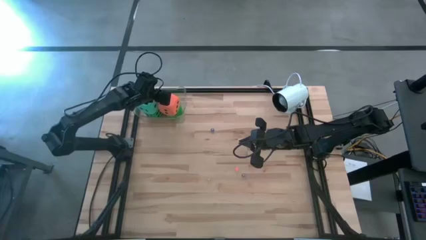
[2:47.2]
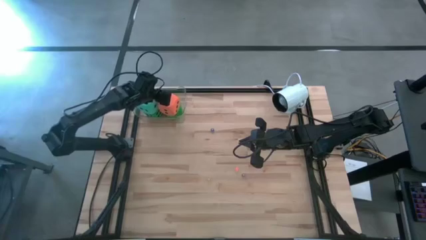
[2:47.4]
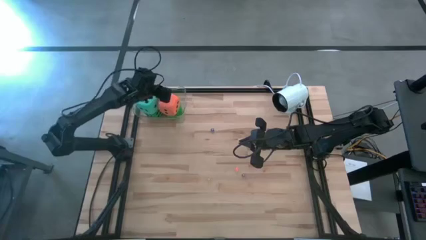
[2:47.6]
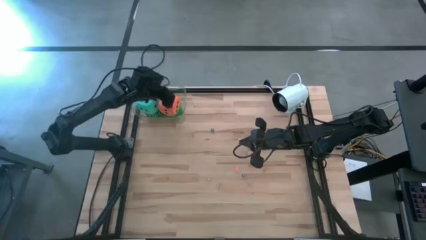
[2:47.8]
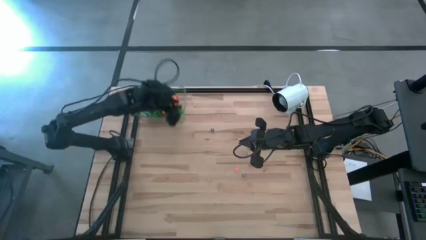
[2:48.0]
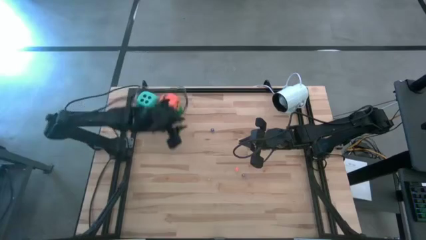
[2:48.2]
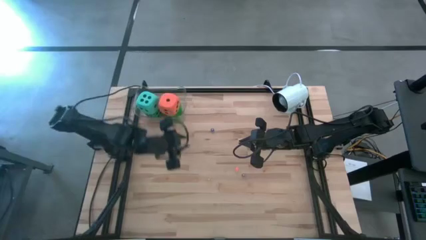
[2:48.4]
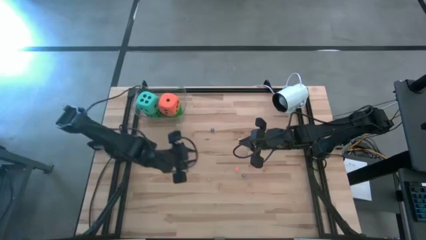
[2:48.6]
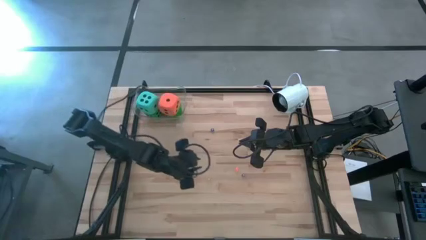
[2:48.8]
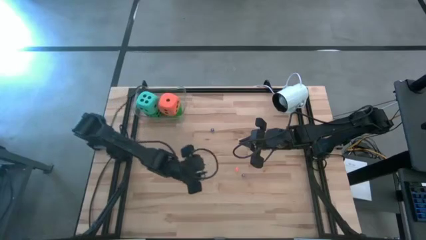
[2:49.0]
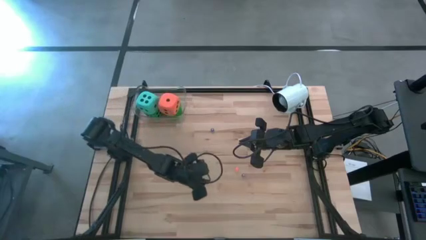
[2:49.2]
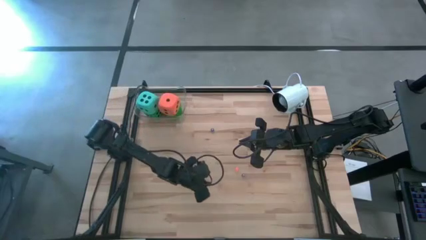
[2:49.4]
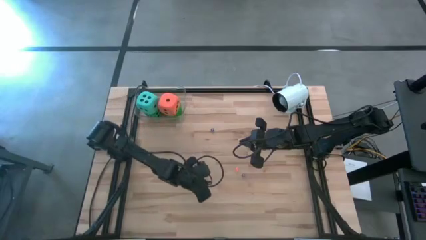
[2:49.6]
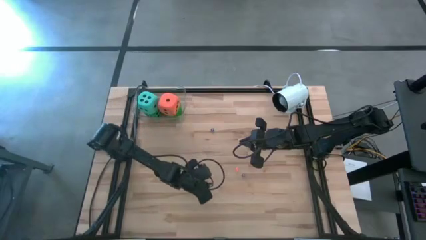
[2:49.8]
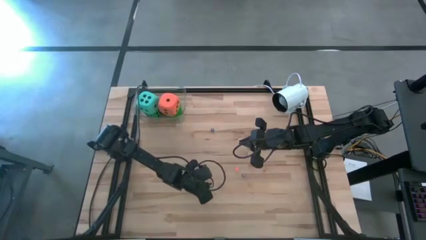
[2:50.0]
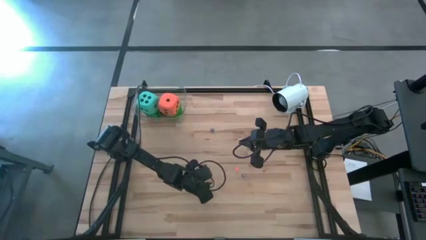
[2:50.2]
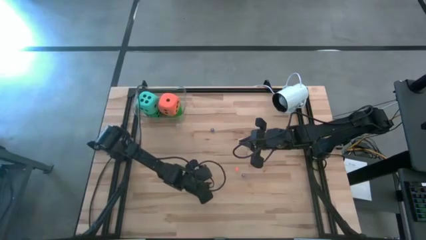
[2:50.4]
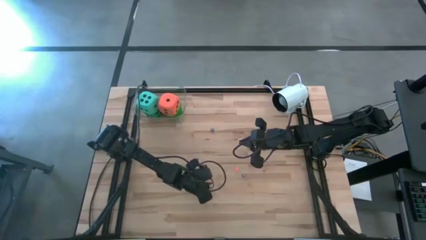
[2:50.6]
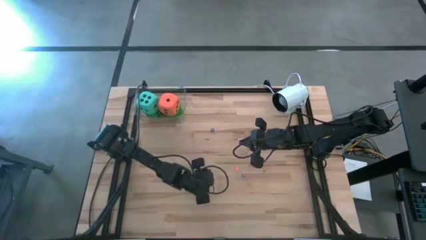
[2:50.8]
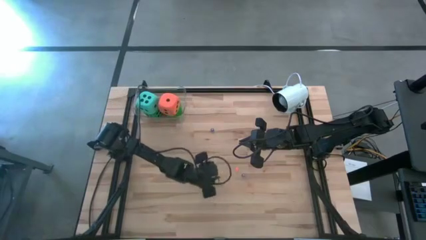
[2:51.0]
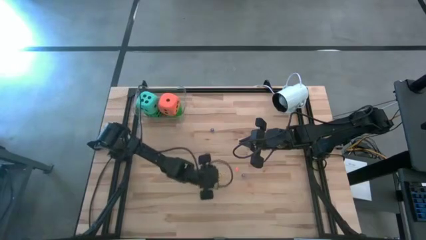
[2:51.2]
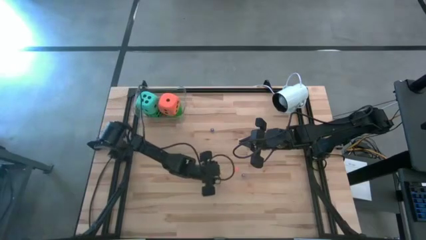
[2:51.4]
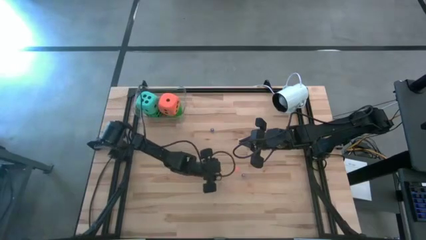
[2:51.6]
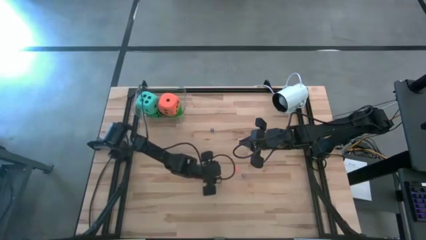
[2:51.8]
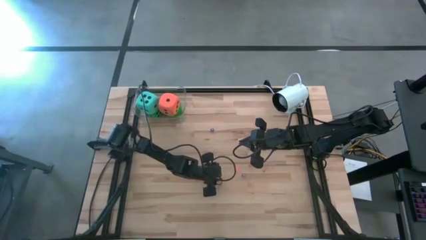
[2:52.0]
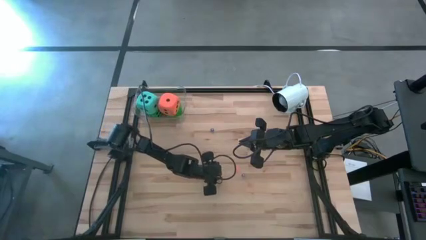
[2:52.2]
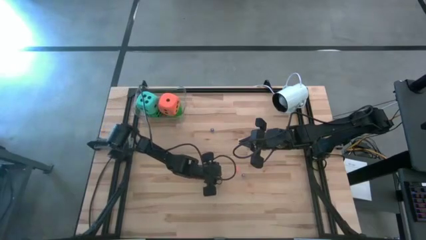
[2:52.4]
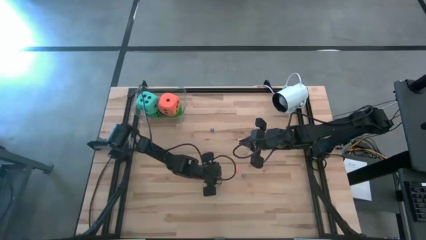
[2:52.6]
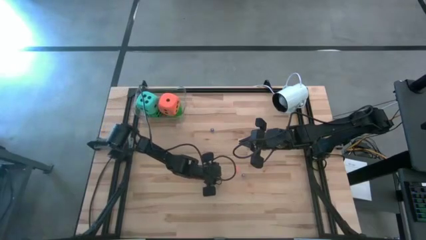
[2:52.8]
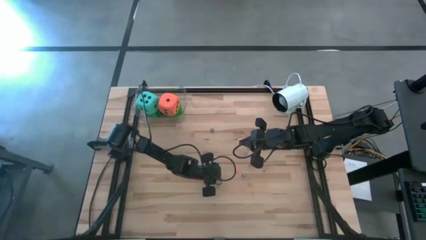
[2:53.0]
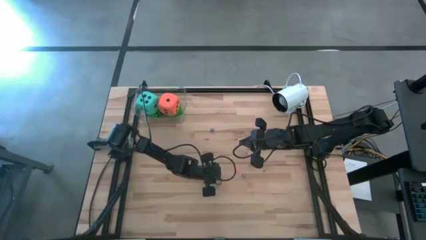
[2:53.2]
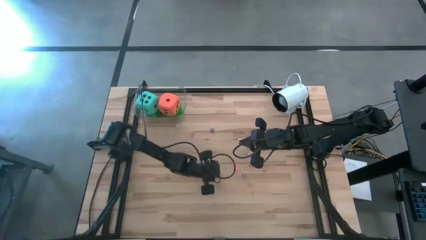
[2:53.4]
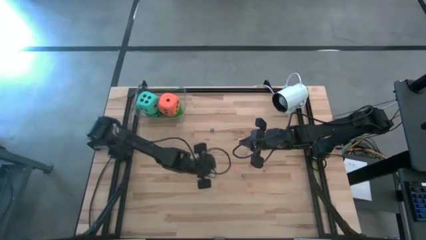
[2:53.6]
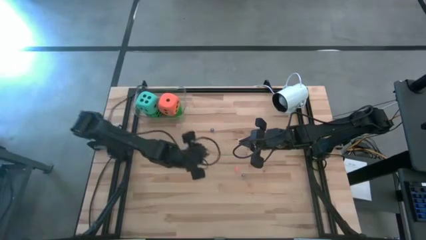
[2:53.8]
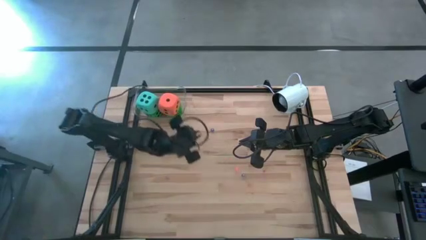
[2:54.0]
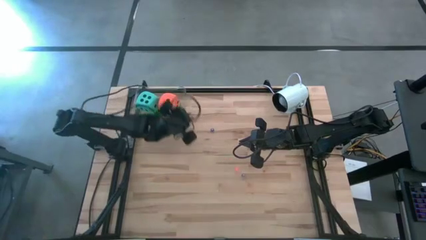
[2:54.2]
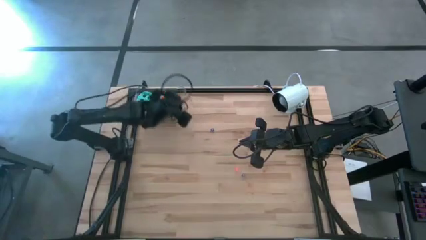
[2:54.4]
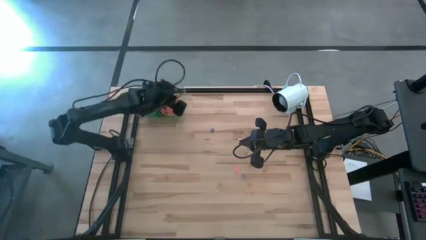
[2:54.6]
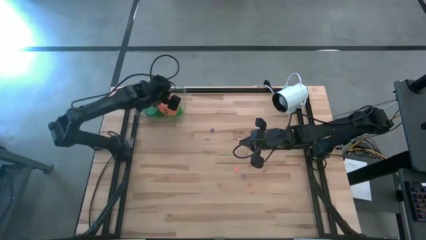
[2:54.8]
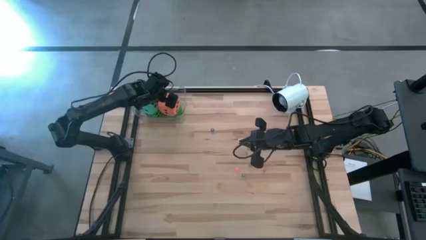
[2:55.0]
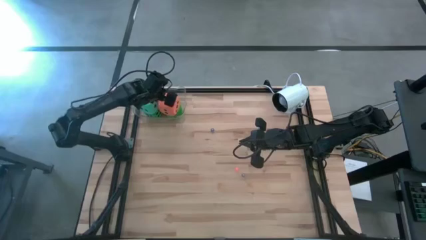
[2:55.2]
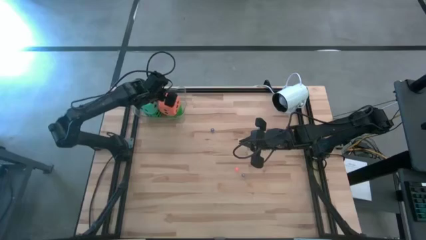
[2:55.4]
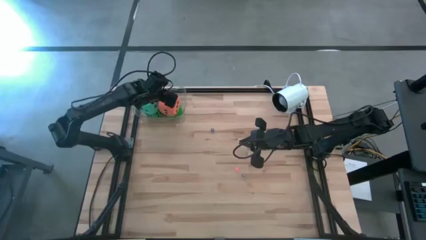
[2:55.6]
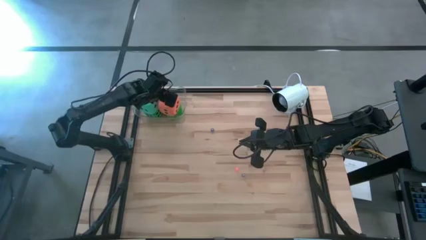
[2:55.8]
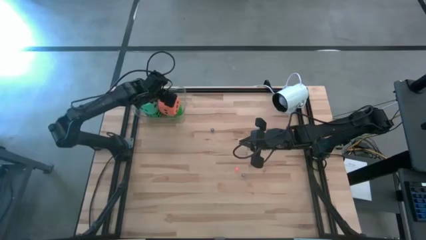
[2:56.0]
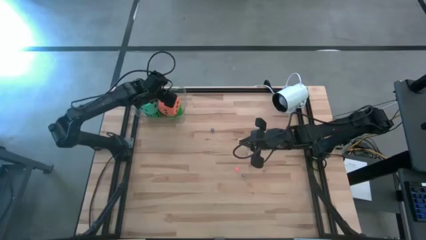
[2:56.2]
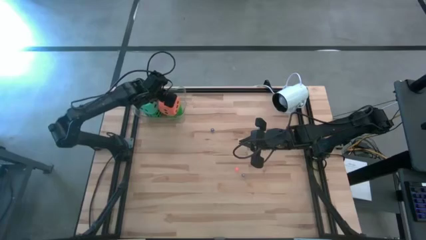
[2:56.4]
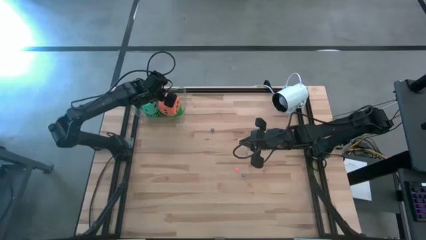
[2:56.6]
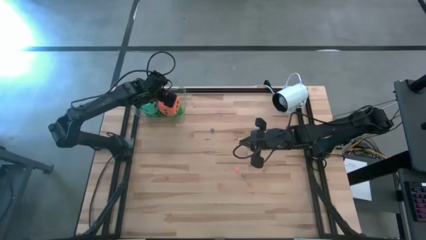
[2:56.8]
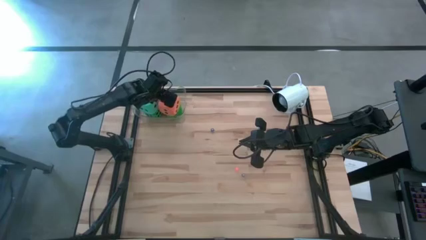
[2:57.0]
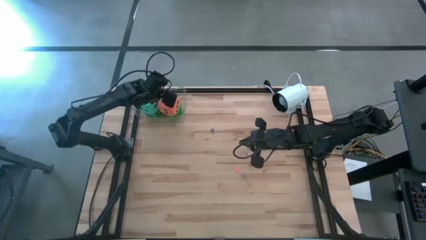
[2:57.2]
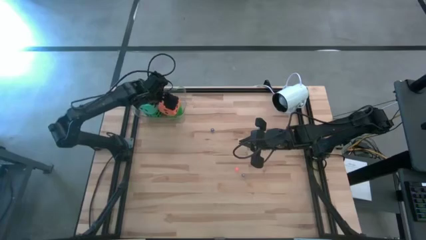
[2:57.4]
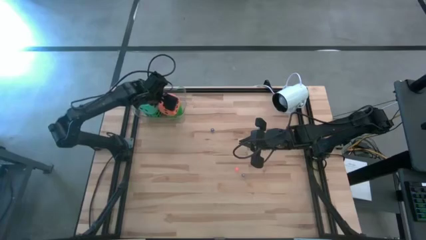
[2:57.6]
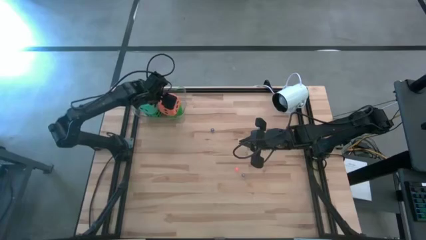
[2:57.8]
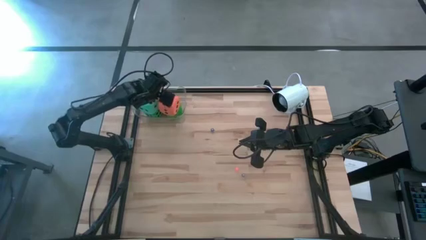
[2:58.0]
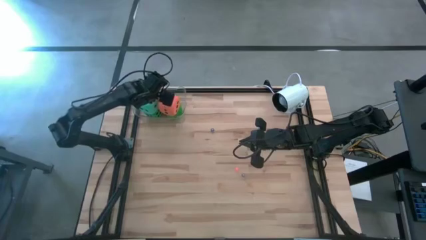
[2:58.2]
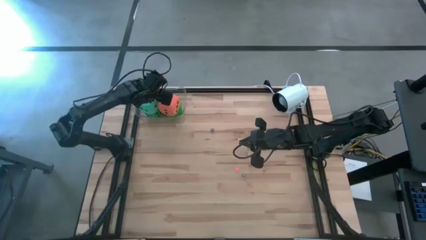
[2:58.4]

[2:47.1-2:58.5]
Task: Pick & Place Dice
Put the small yellow die into the transparent bin

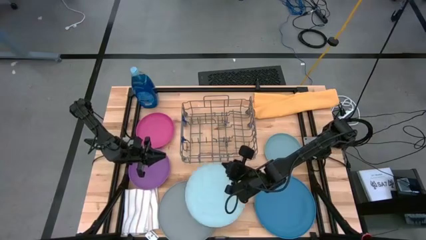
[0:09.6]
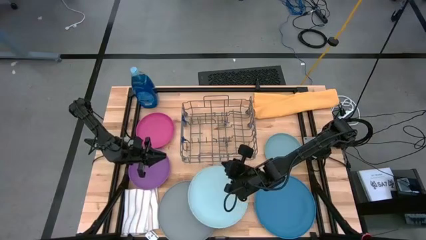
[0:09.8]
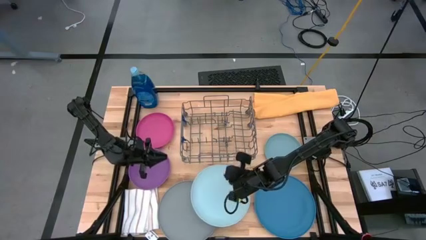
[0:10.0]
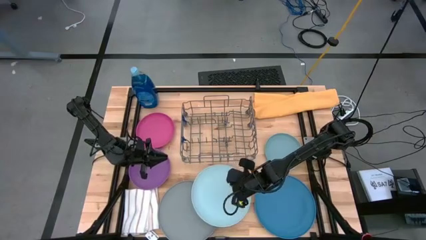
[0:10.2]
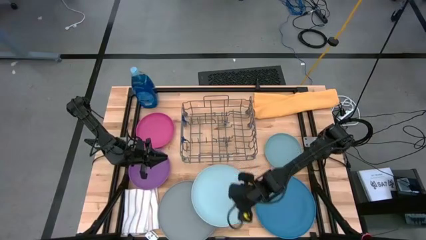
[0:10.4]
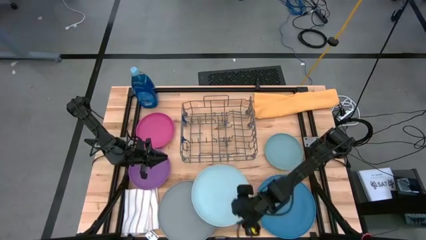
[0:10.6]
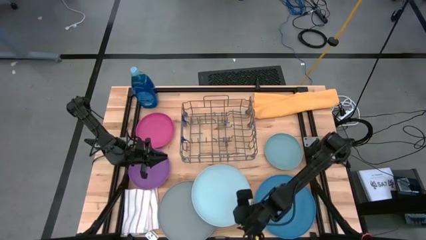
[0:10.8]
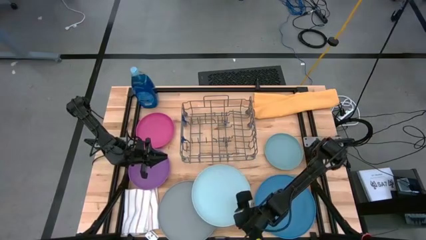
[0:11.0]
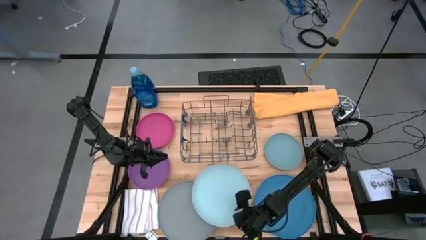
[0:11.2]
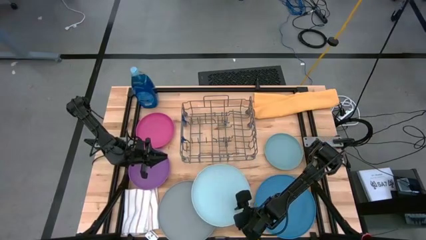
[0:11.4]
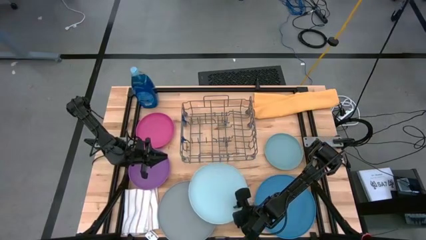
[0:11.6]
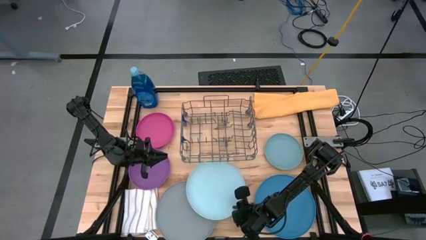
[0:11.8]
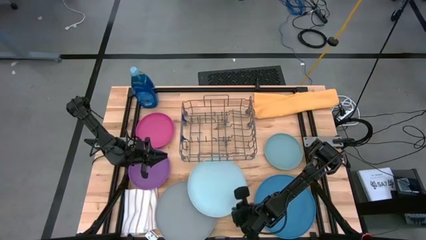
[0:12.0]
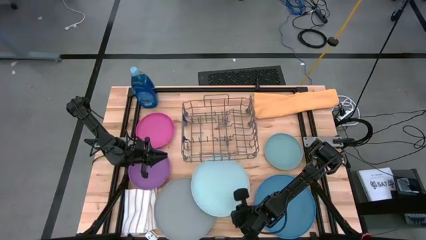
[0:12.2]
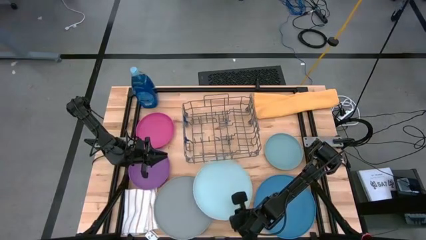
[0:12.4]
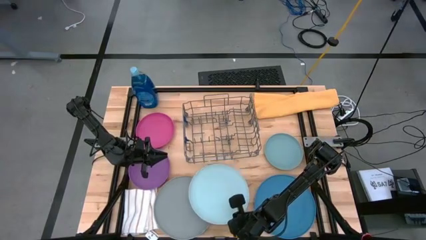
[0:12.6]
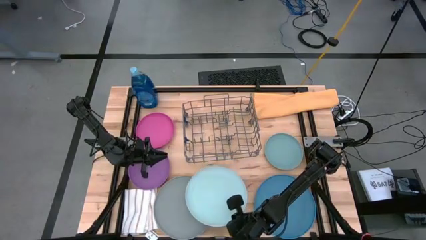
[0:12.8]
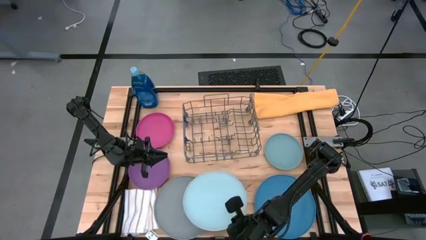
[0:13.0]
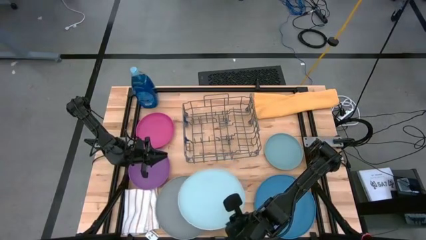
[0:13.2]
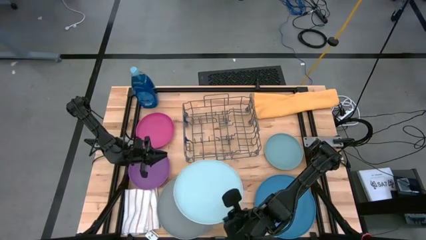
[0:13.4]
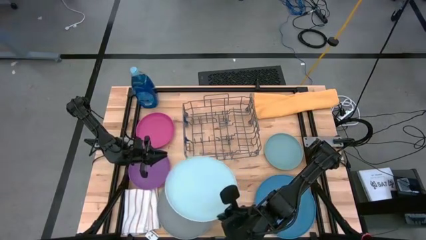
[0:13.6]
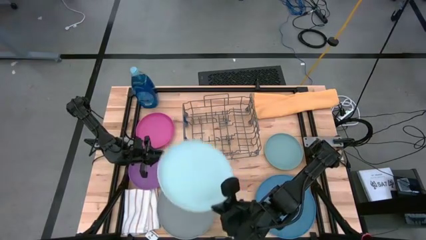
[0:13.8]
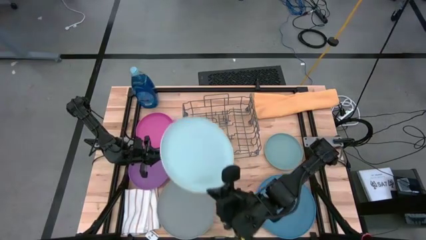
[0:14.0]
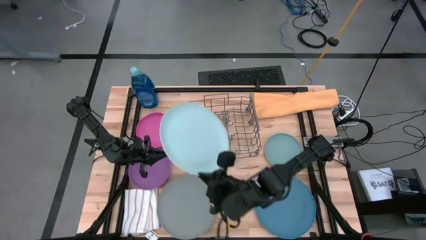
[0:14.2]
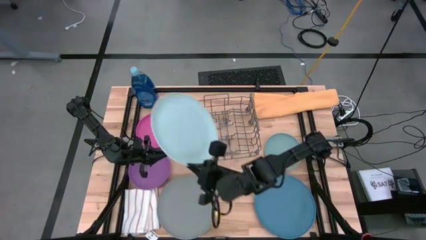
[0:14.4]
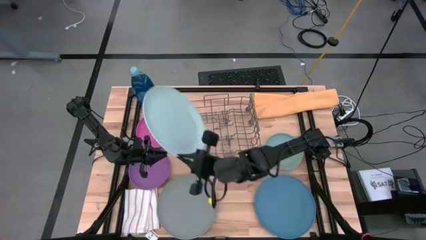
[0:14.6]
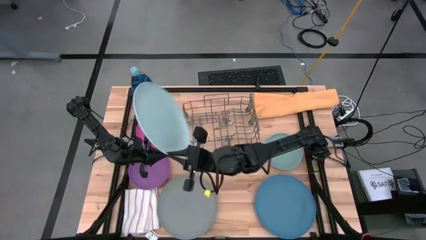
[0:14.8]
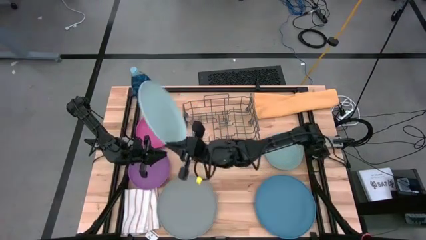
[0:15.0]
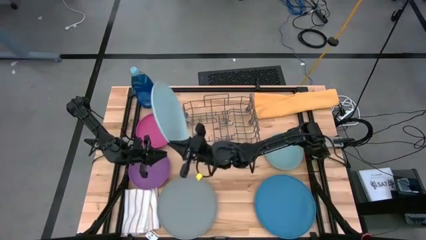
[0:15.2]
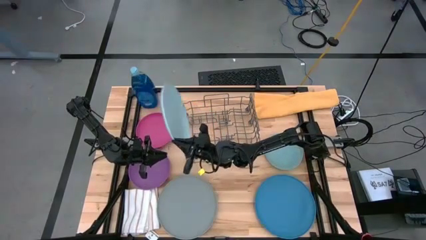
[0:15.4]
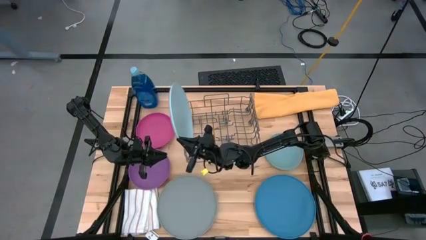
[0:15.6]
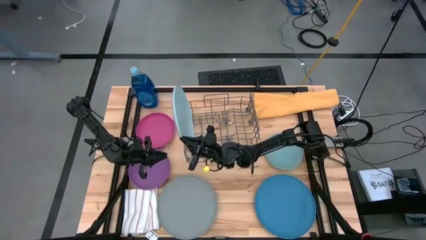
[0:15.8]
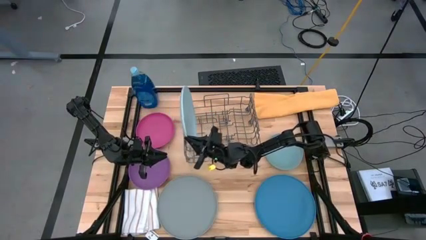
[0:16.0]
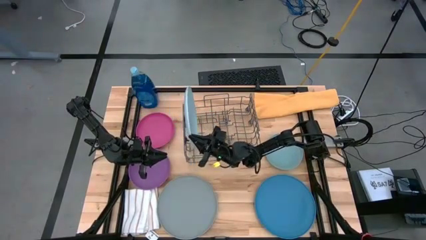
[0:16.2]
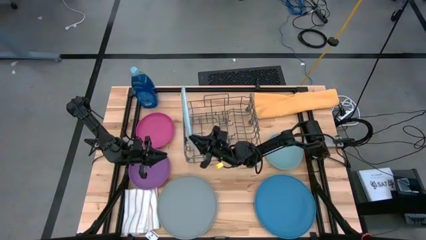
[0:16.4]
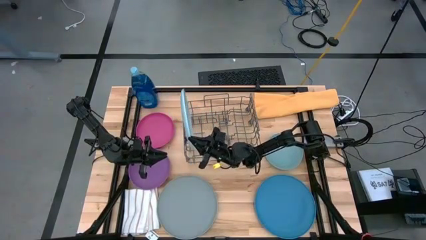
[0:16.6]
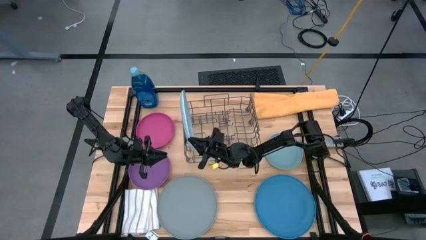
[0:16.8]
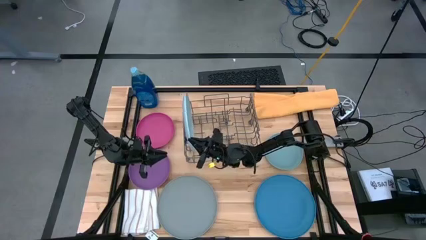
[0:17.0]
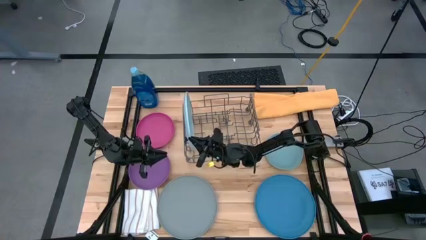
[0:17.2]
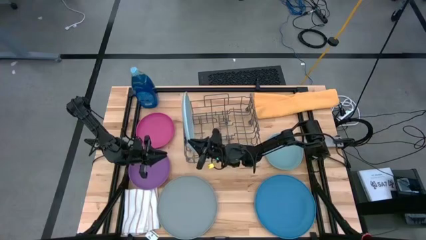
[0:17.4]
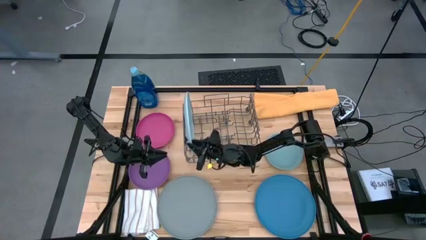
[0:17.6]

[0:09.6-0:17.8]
Task: Sort dishes
Put the light blue plate into the dish rack
